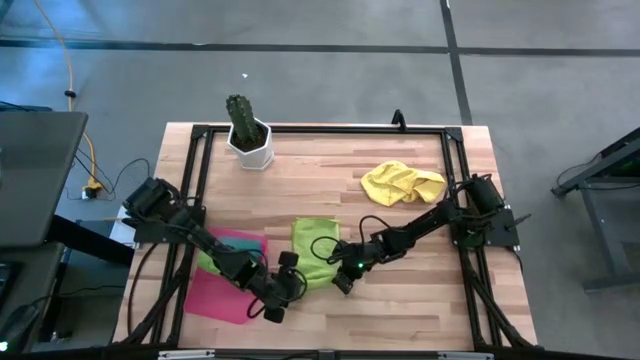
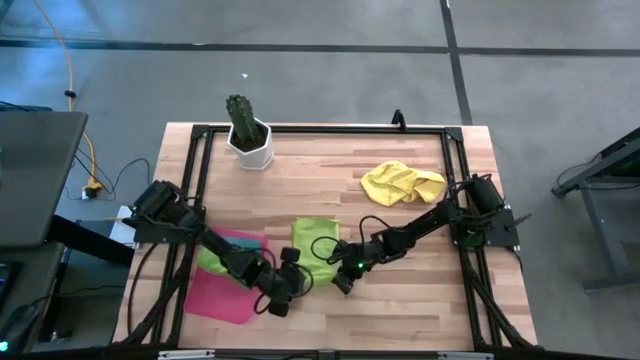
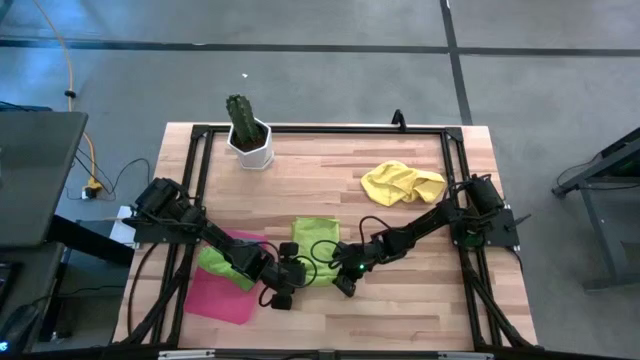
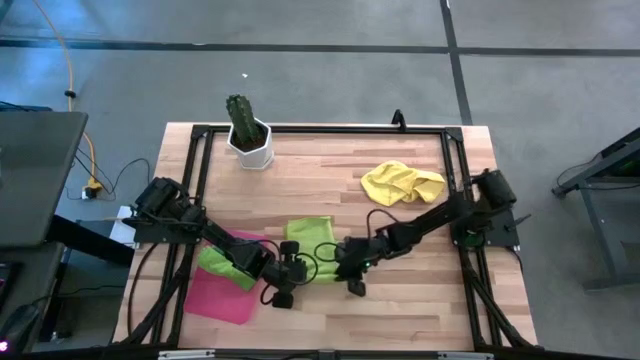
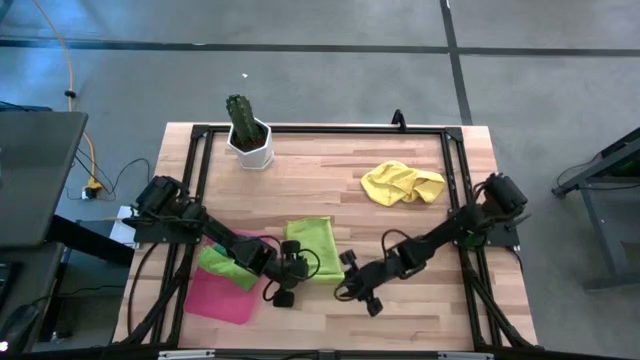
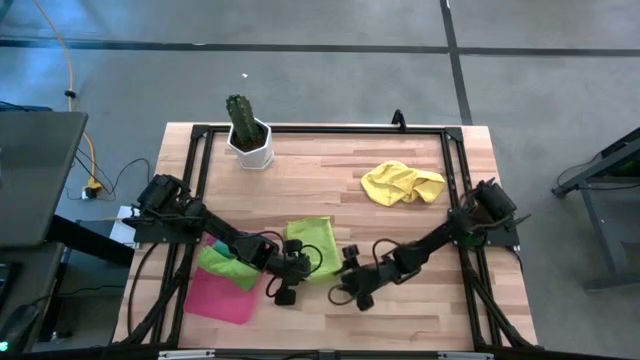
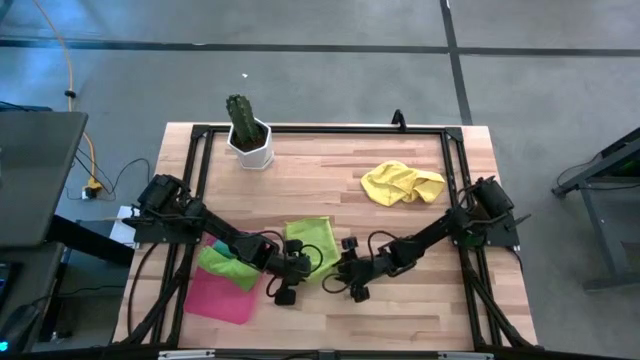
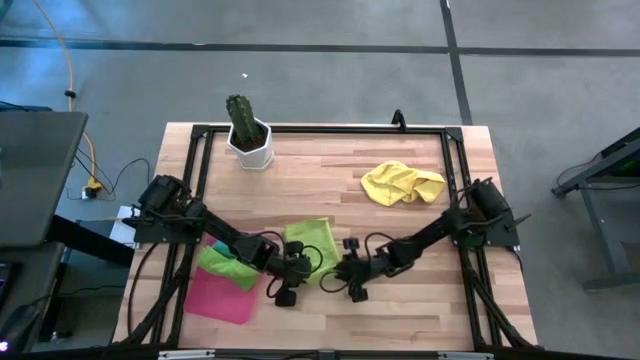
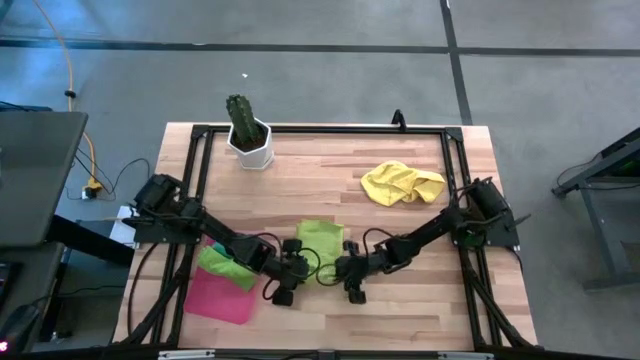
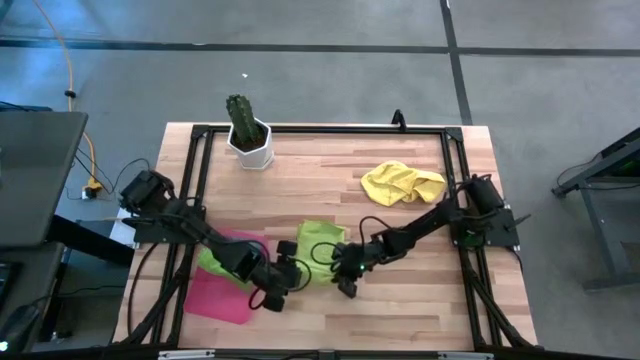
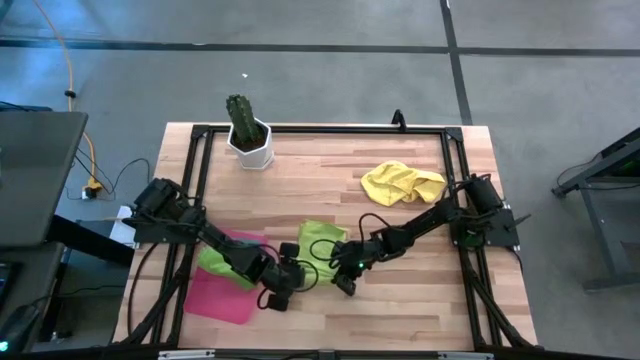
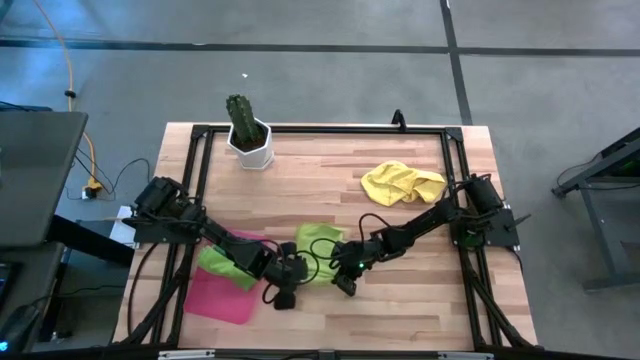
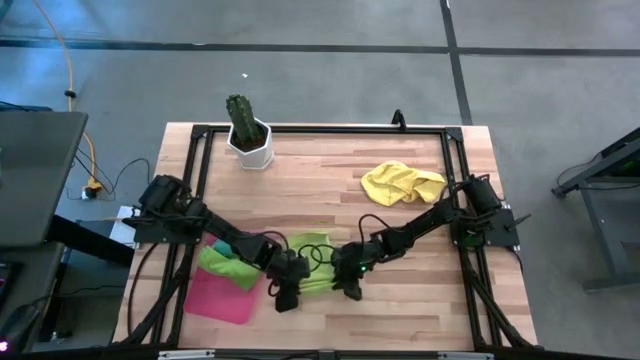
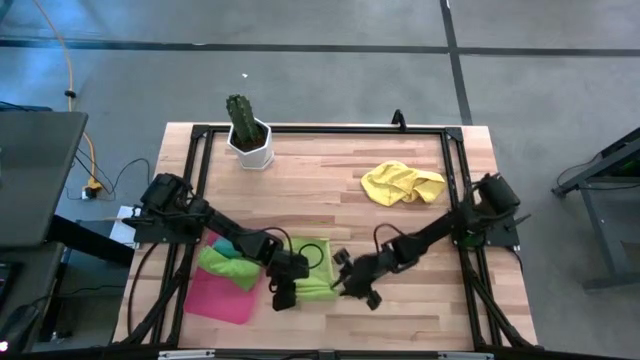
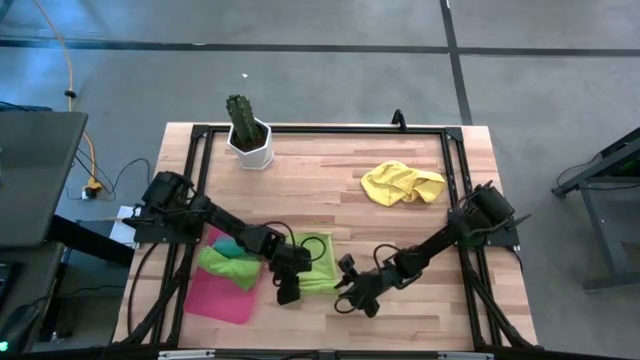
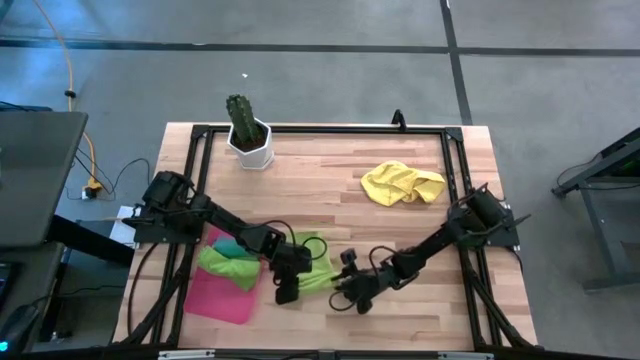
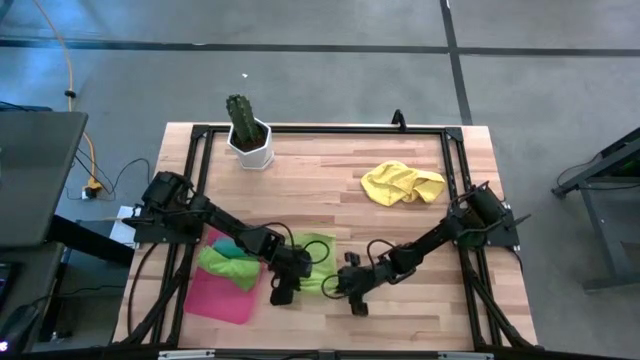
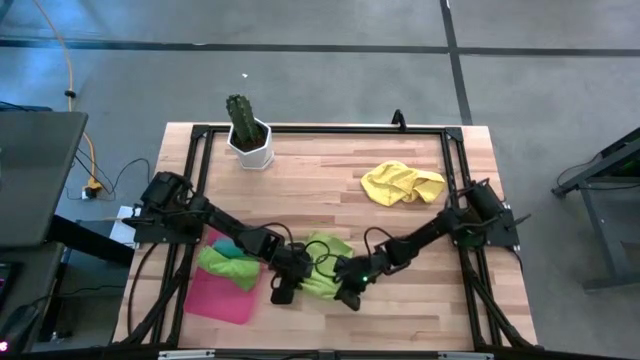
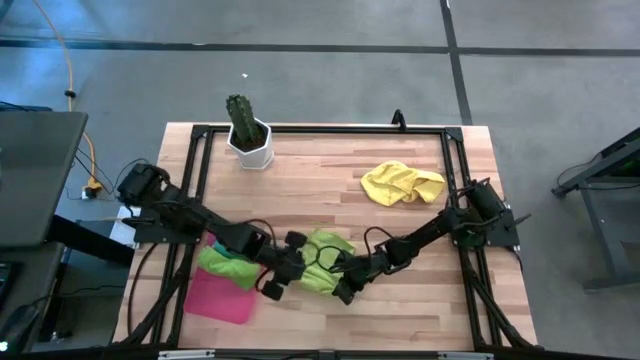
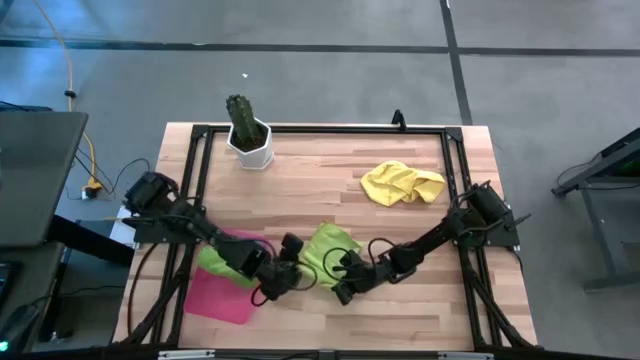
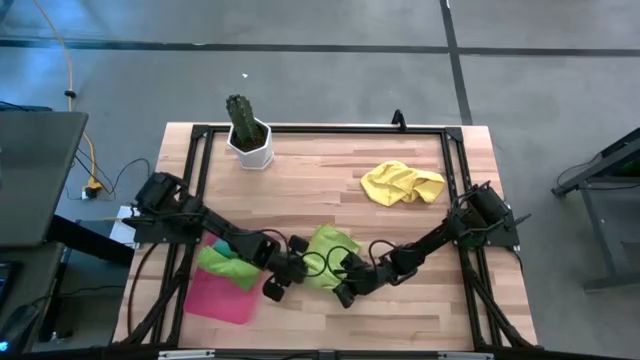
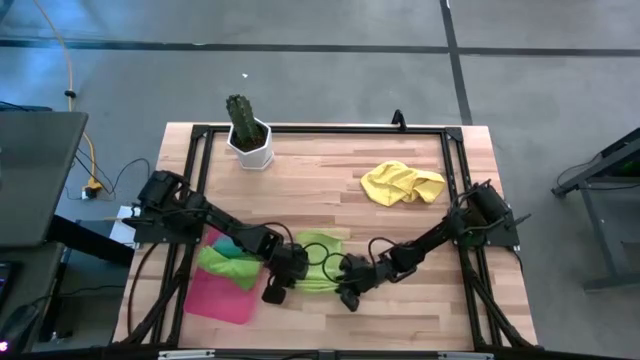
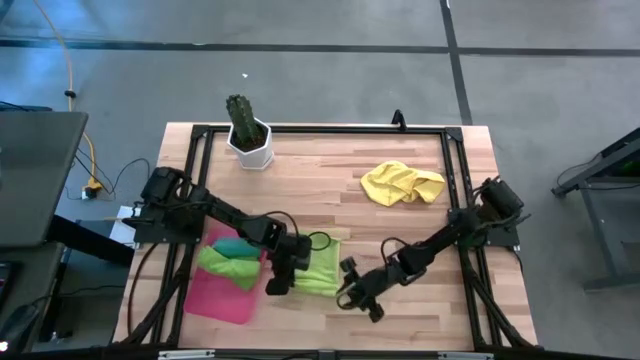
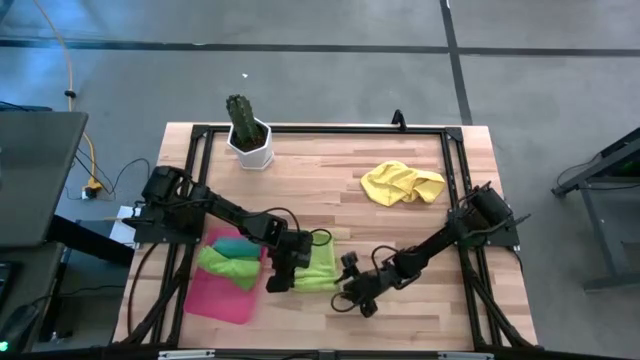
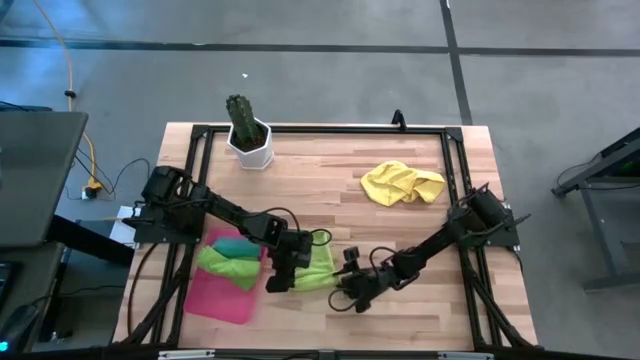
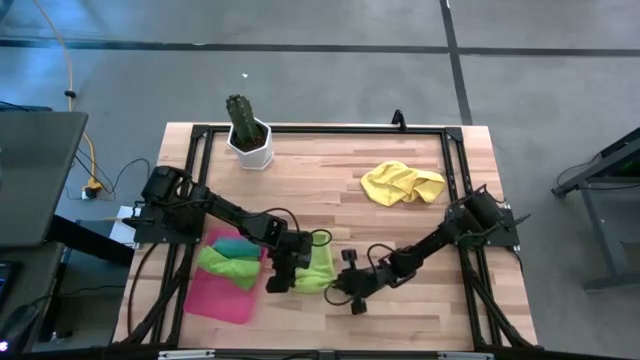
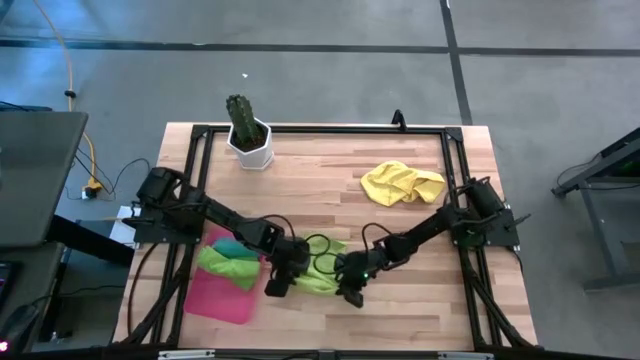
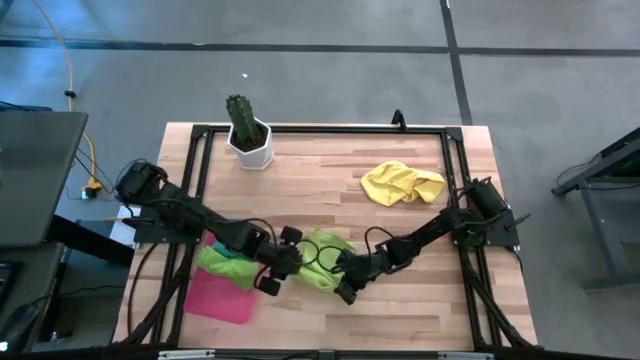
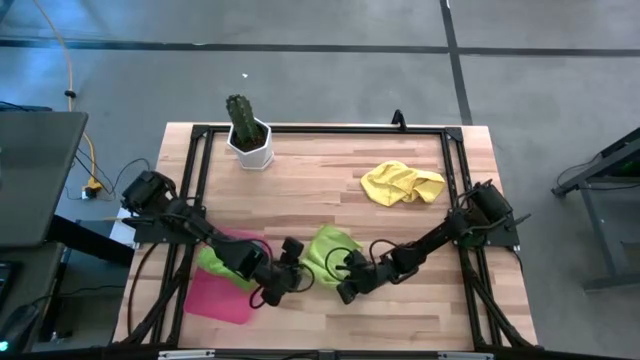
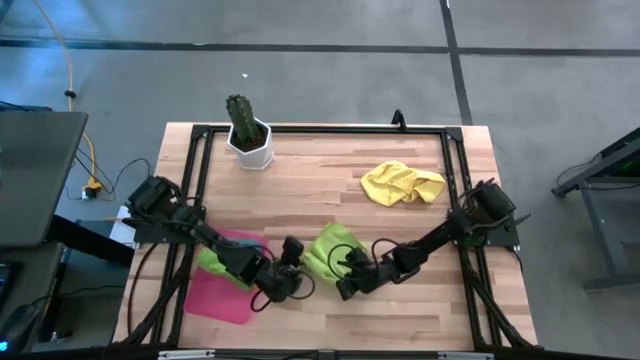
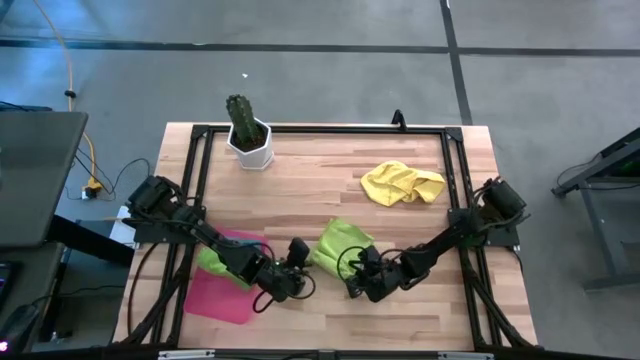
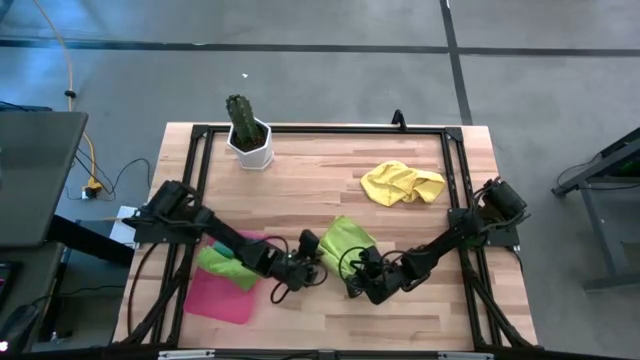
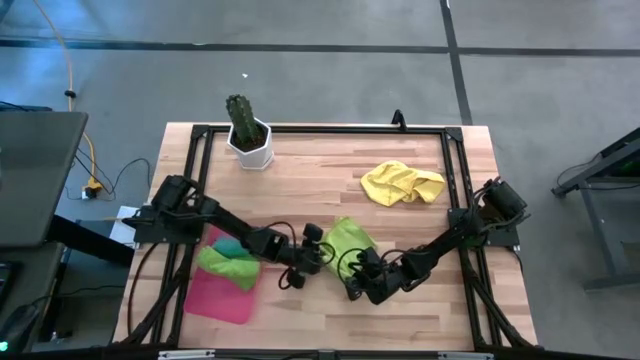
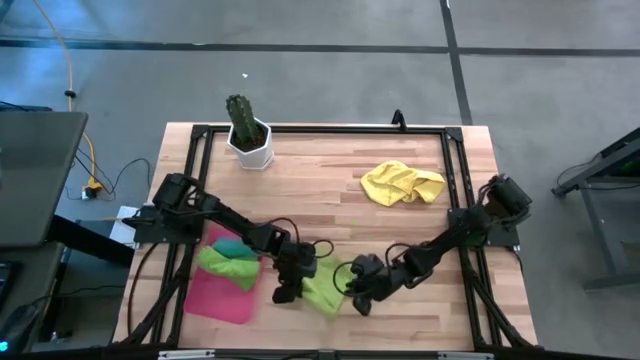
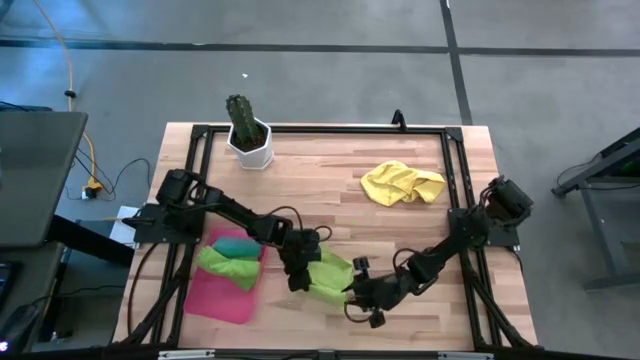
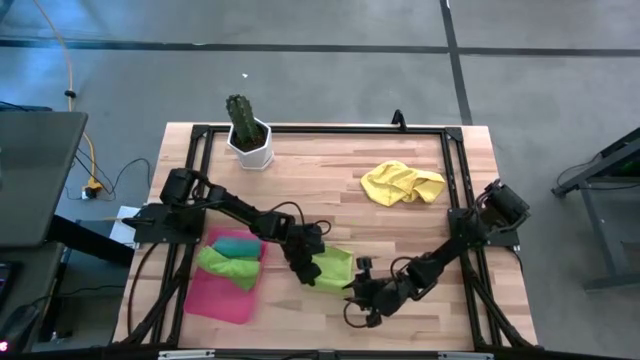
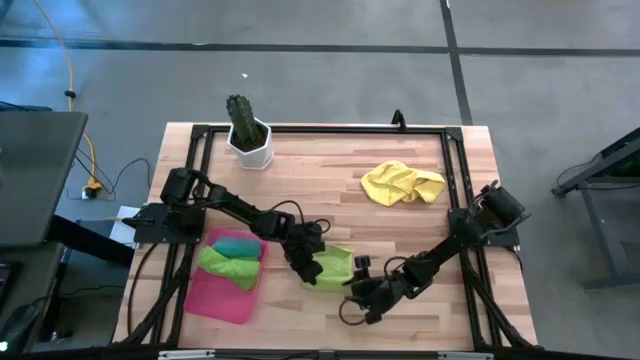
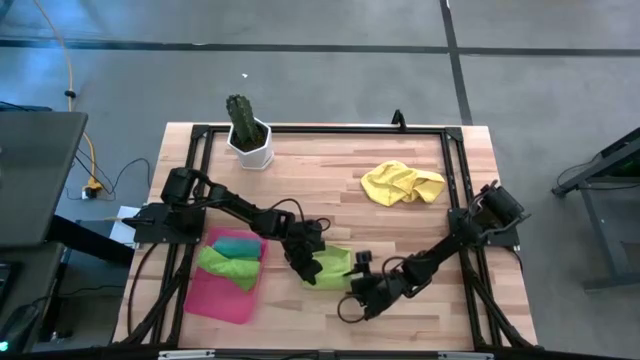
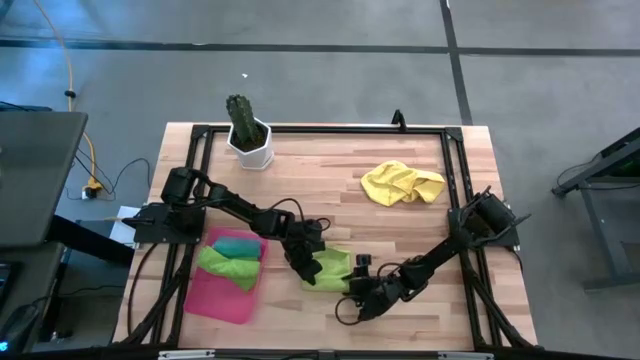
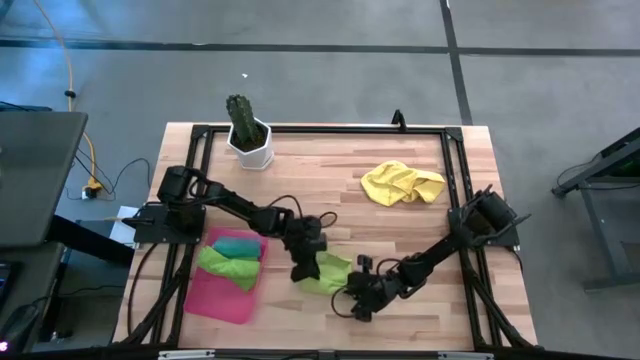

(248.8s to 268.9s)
Task: Roll microfiber towels into tight, uniform cylinder then place into a basket
Roll the light green towel
